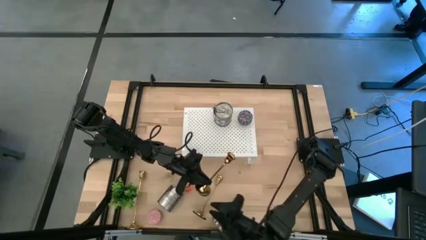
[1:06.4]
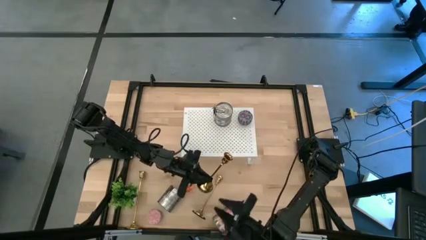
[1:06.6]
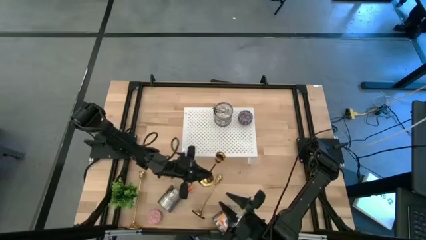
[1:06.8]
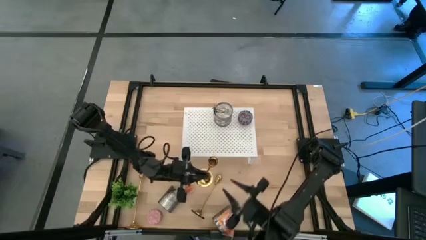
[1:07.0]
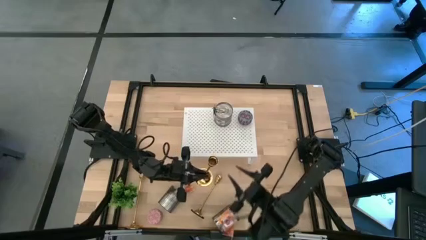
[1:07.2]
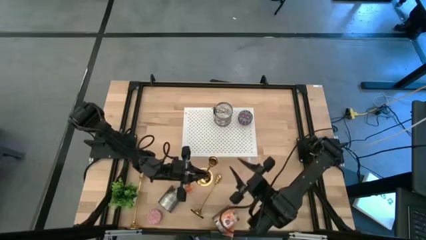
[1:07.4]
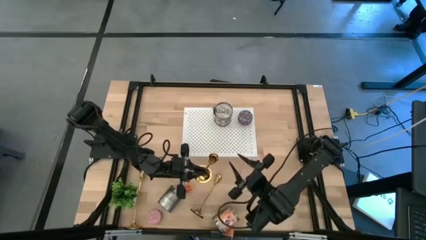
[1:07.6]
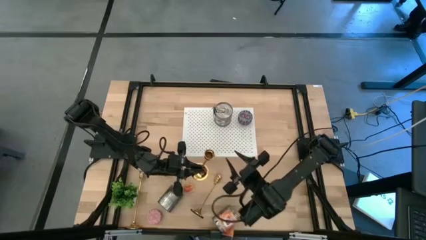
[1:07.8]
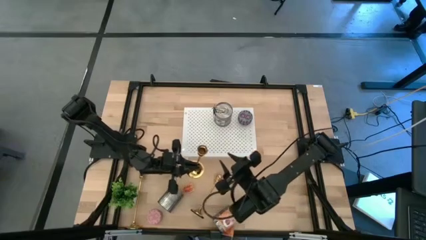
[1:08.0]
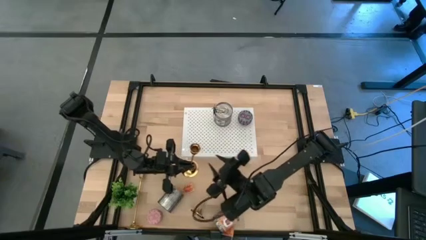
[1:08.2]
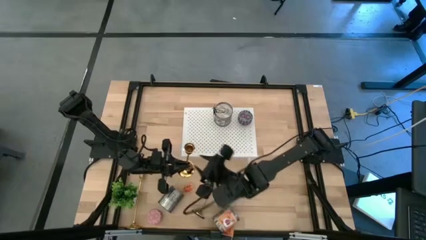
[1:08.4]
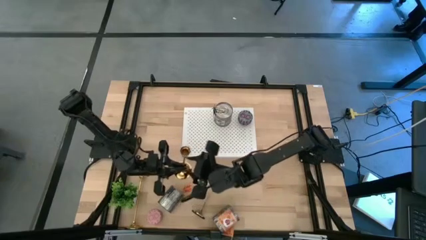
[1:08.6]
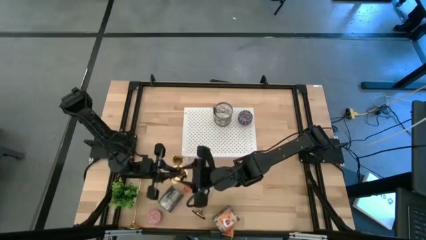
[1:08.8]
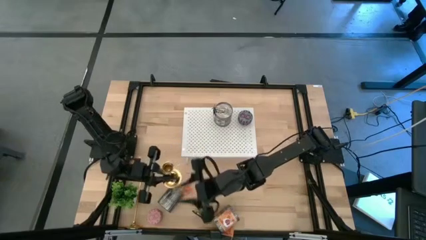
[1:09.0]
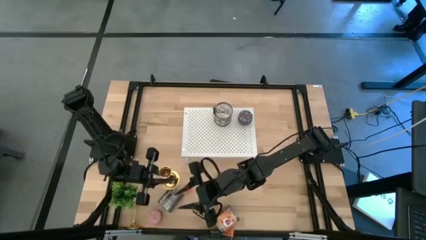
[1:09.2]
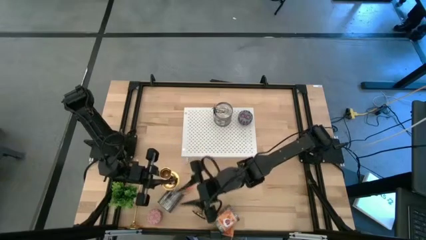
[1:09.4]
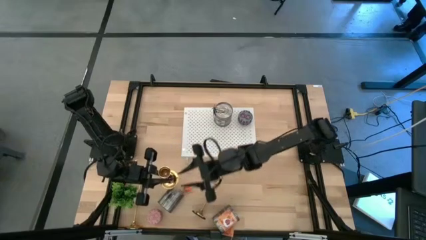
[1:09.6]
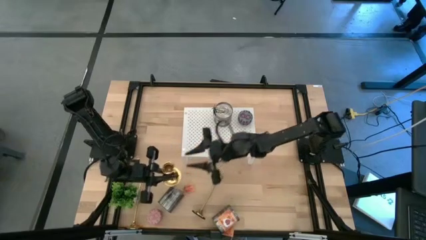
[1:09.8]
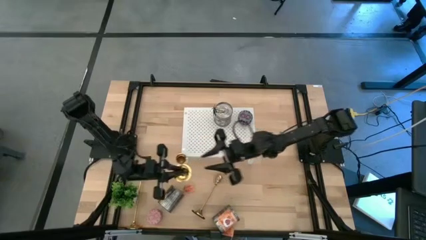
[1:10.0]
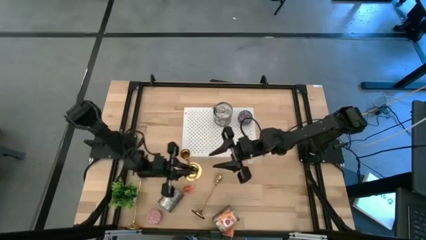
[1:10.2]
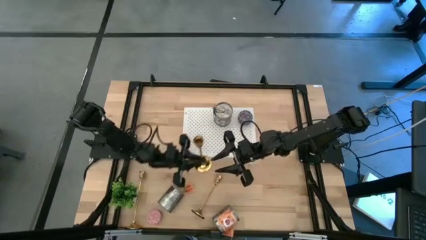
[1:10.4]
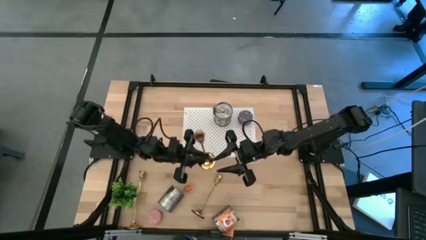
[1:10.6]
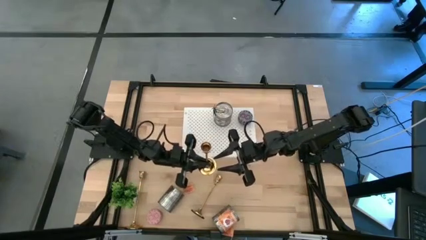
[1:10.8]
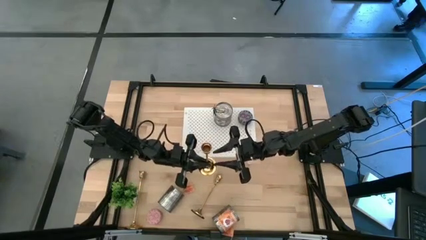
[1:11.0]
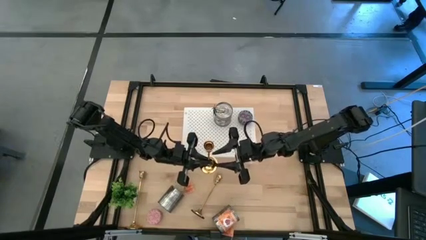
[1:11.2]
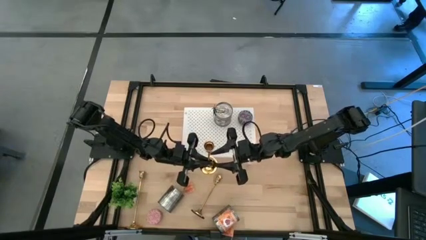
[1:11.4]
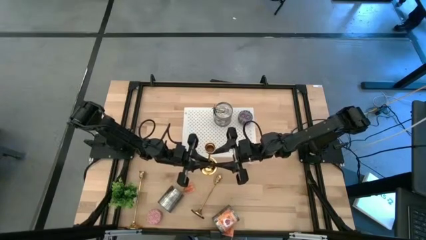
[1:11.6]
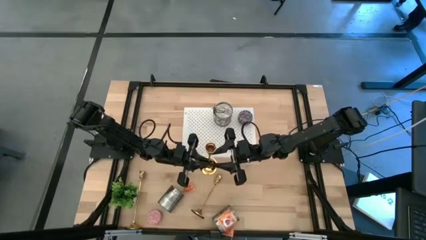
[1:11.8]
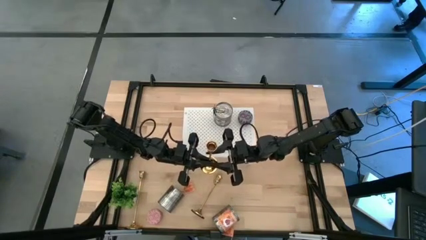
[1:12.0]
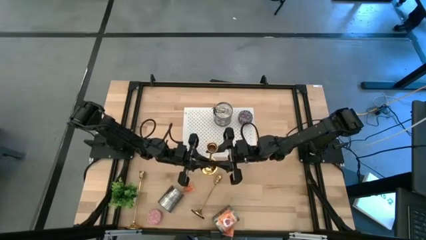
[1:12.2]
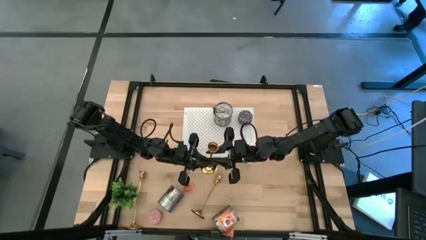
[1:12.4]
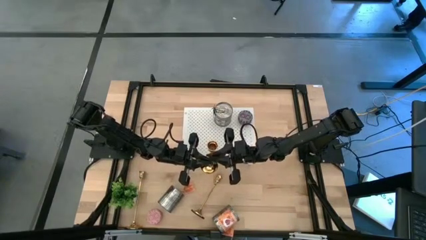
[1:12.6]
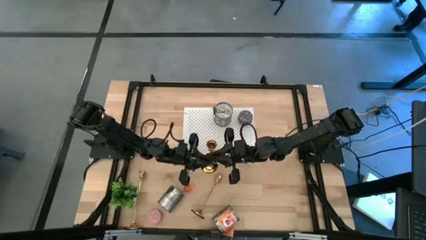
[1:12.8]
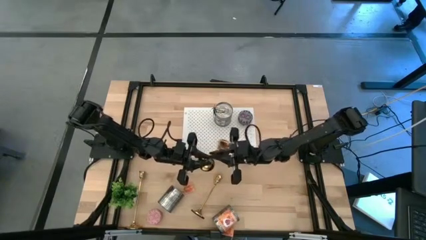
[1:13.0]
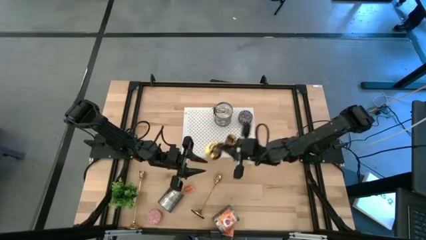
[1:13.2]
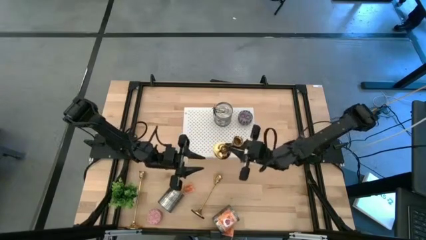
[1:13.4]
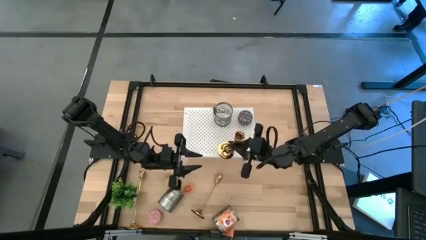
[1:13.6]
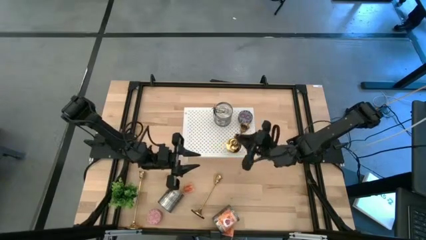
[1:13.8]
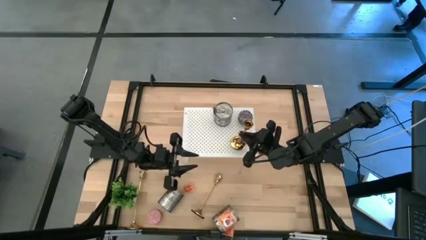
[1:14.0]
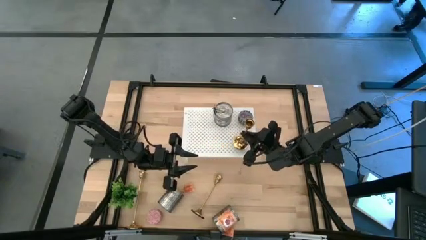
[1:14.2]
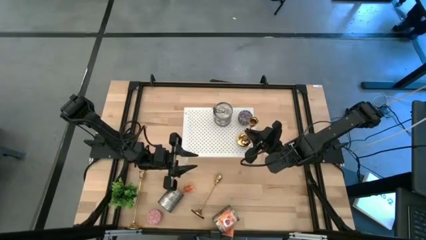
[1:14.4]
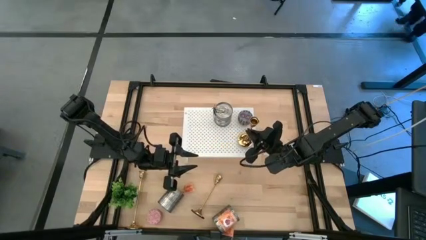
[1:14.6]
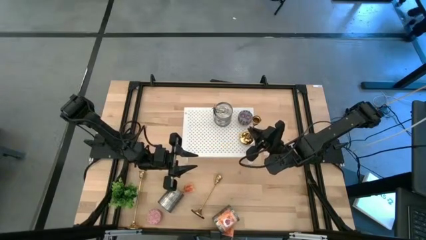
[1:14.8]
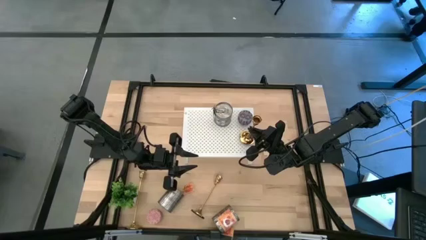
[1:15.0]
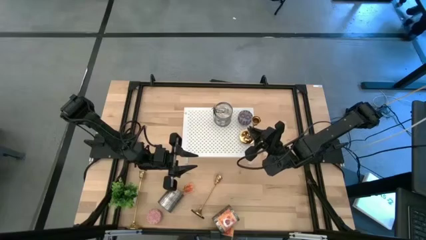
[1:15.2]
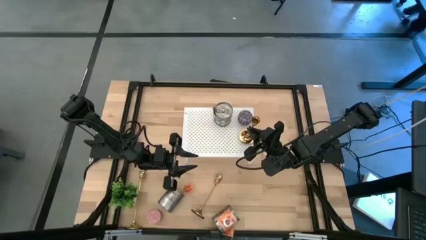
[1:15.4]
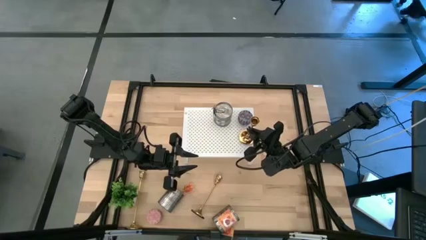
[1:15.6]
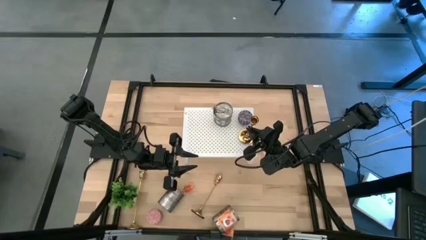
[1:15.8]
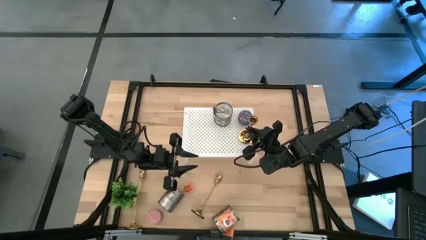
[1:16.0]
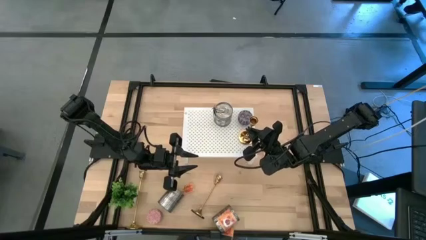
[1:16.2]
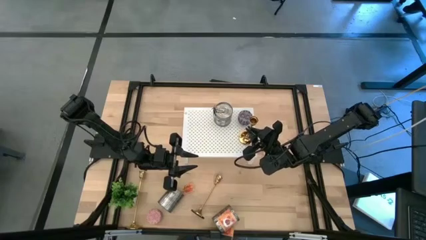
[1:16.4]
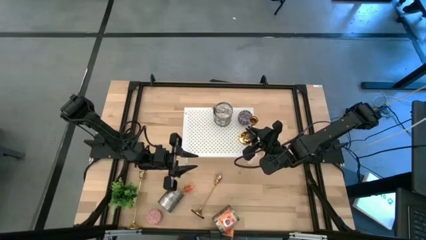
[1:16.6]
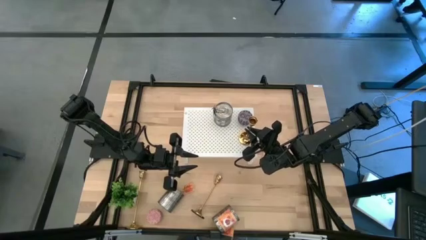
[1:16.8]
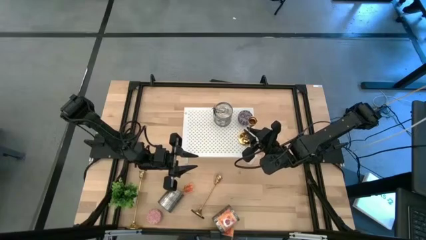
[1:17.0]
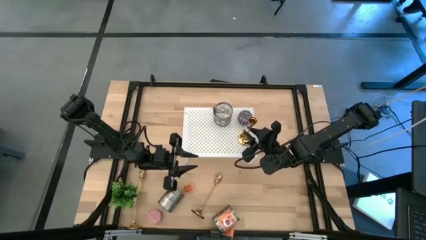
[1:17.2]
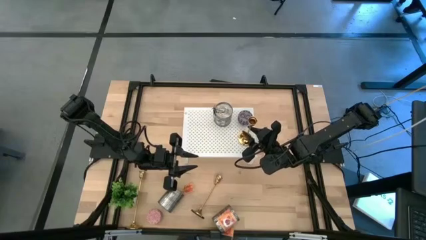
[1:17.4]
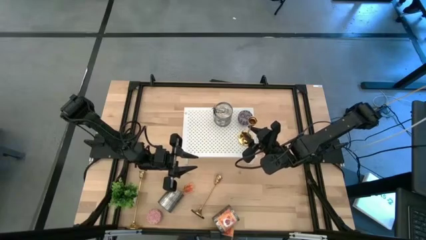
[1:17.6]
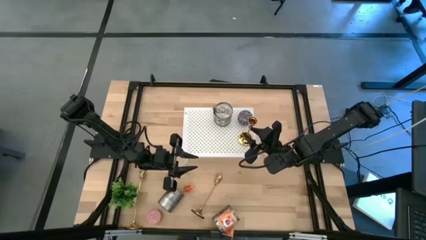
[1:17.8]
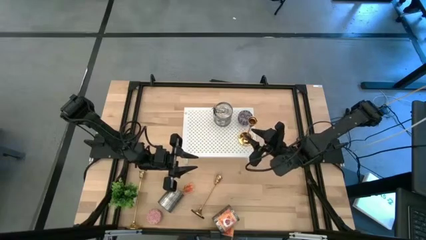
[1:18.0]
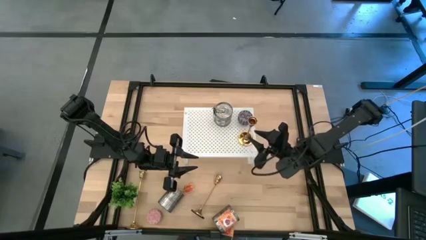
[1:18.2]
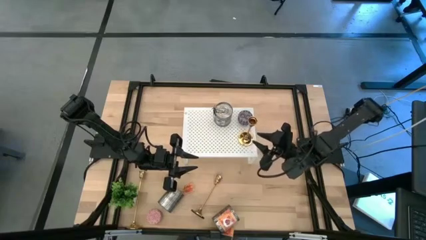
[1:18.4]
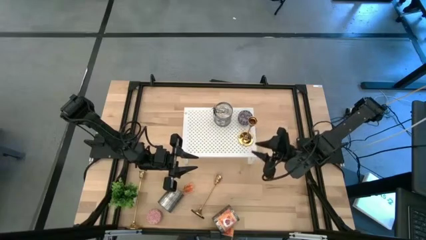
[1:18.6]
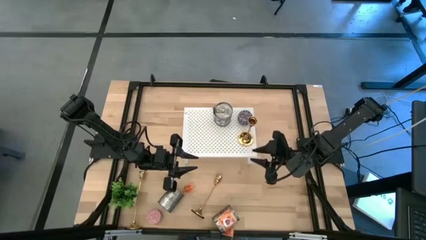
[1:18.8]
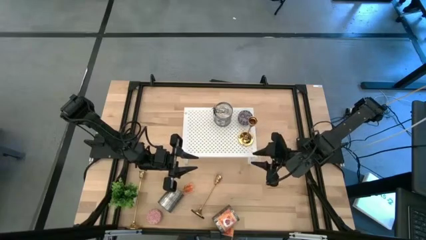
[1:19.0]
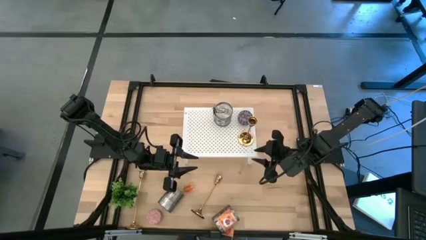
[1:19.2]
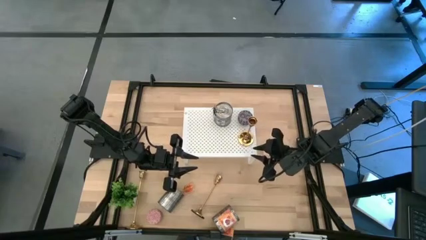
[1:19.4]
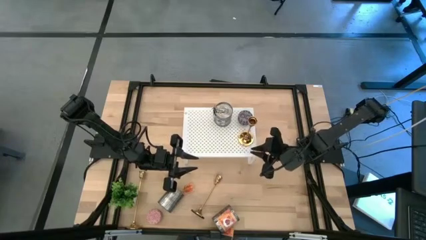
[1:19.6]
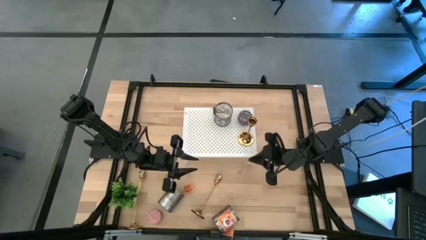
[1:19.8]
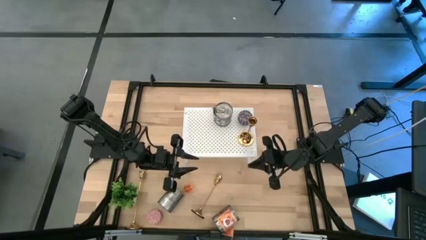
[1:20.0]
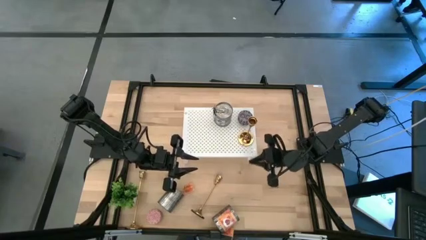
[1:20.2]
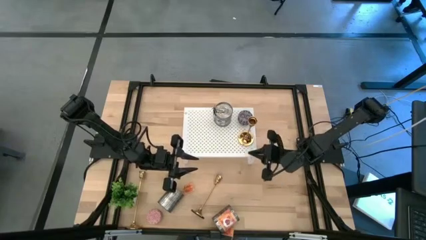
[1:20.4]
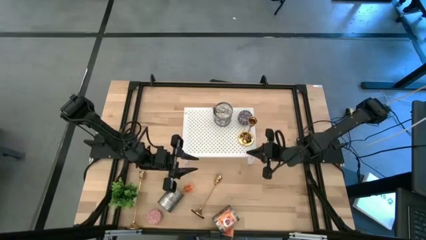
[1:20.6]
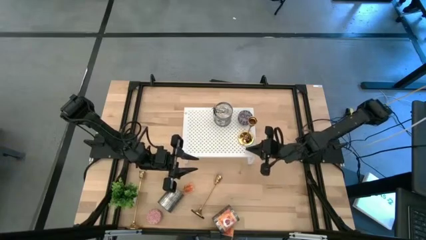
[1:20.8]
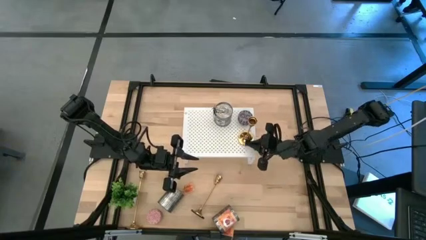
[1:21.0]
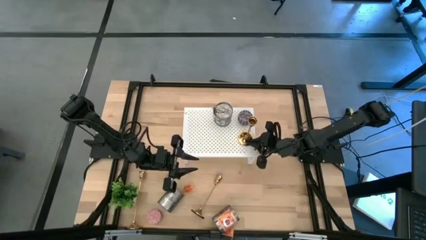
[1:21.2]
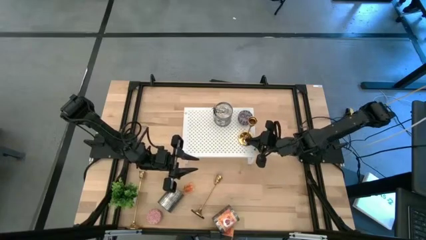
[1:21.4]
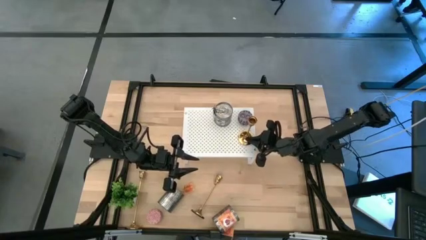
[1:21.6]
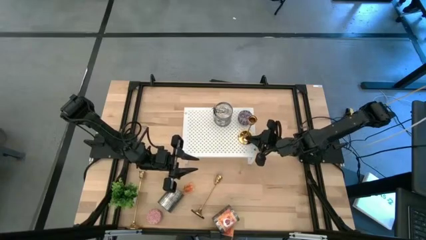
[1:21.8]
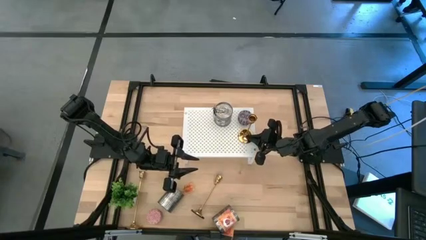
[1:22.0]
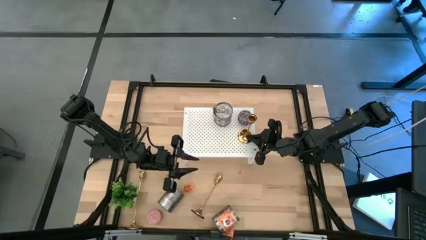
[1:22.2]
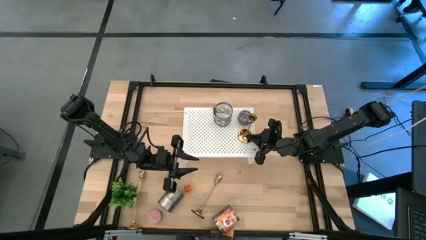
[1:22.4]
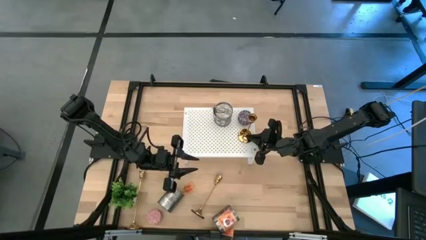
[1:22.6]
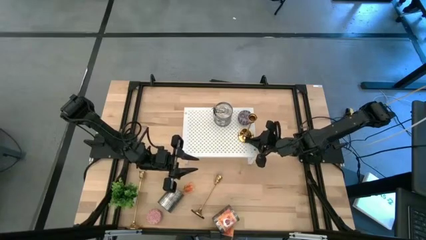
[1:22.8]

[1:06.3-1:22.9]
Task: Pick & Place candle stick holders
Put the right gold candle holder on the shelf
